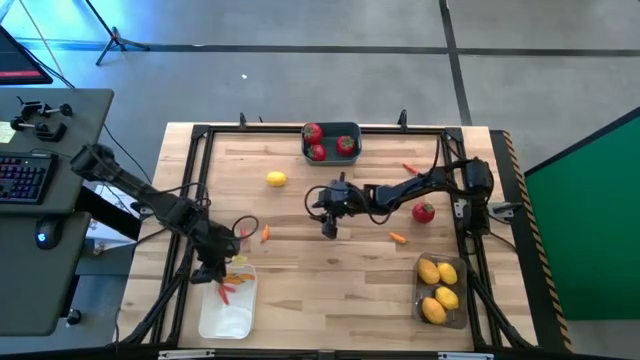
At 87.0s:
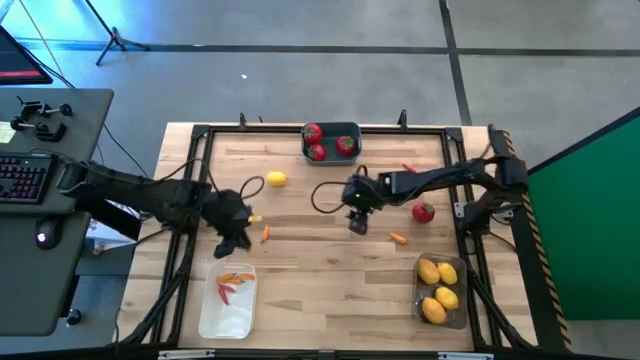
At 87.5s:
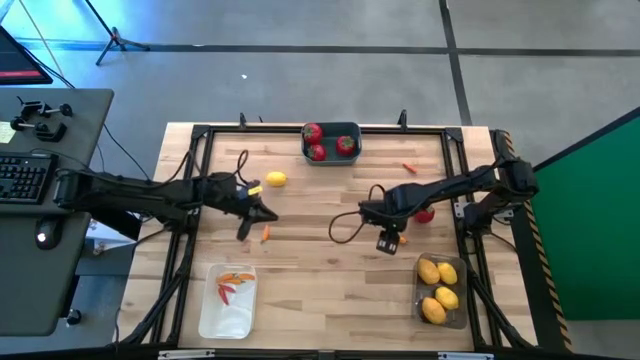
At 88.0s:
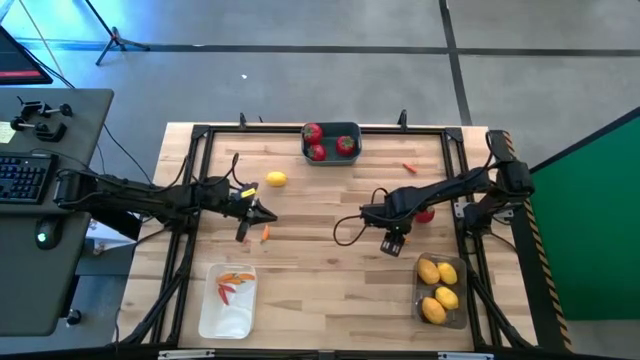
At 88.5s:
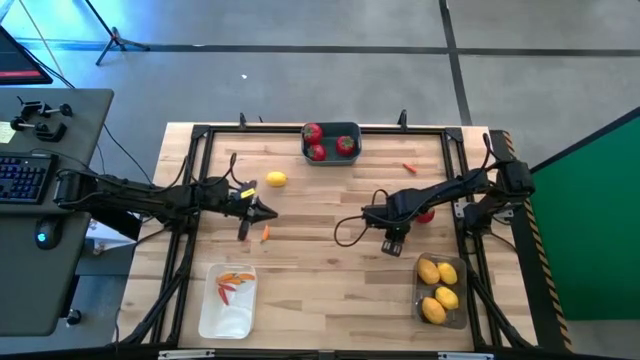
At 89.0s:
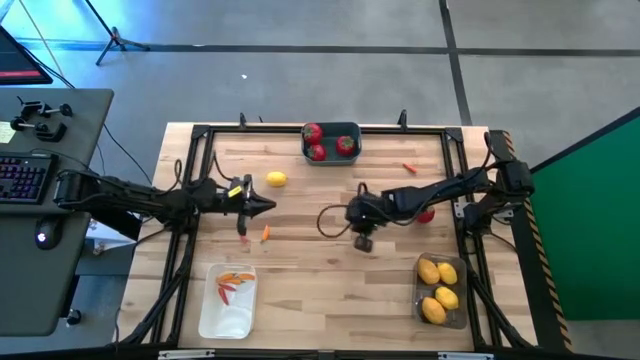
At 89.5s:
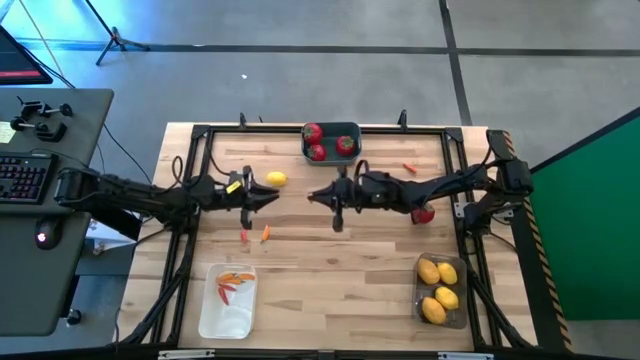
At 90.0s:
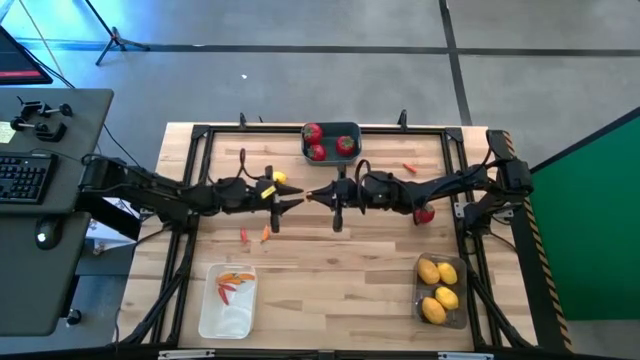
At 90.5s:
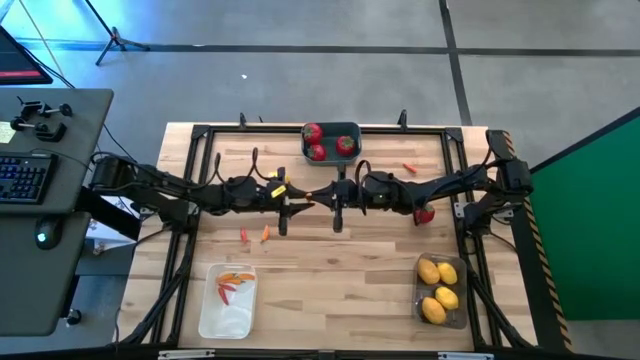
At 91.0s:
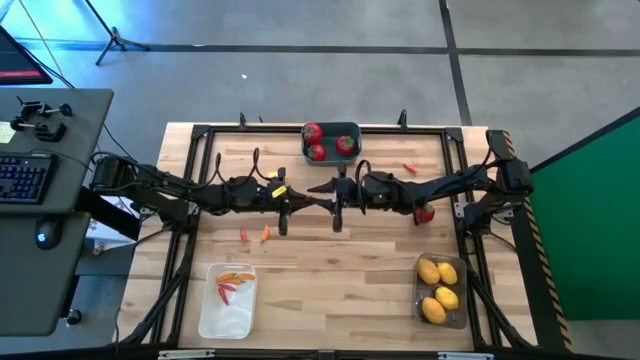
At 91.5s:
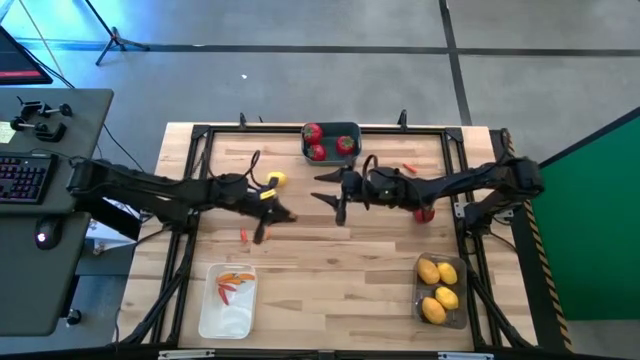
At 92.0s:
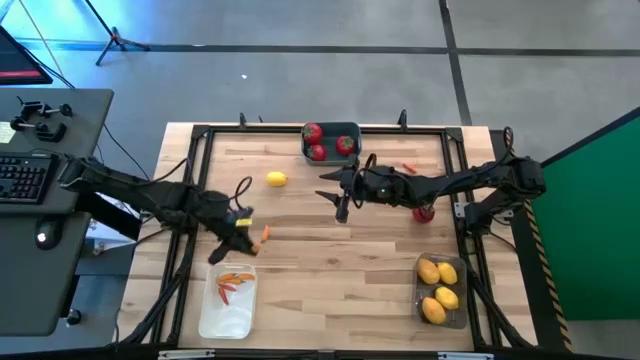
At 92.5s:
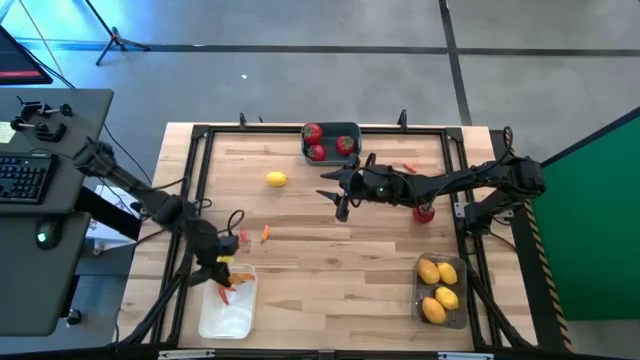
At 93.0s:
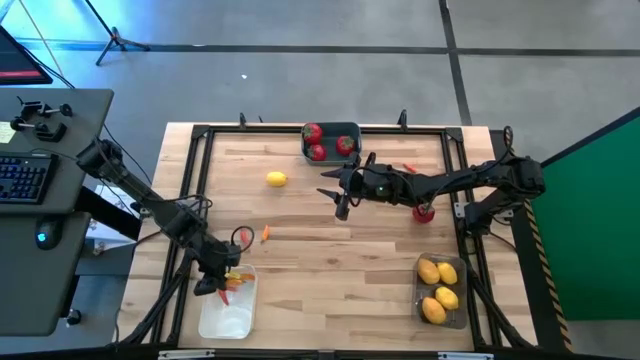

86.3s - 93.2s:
Task: Sort produce into baskets
Put the right orange chili pepper into the white bin

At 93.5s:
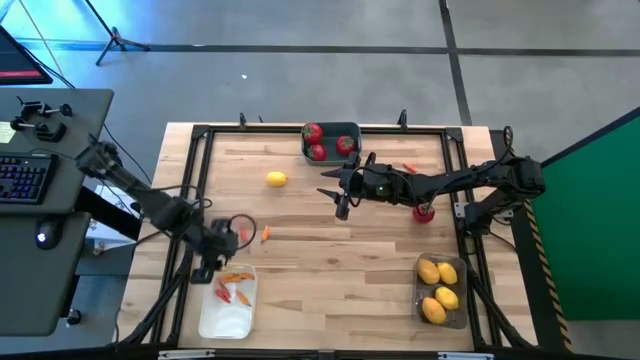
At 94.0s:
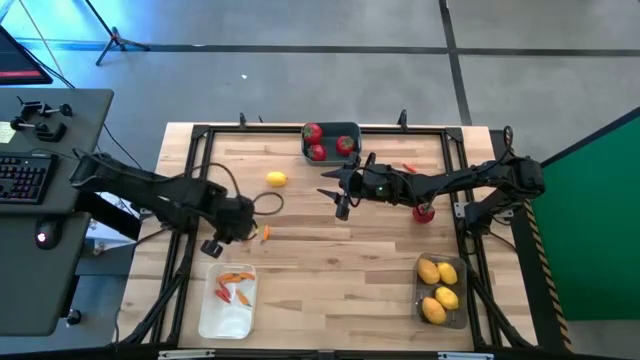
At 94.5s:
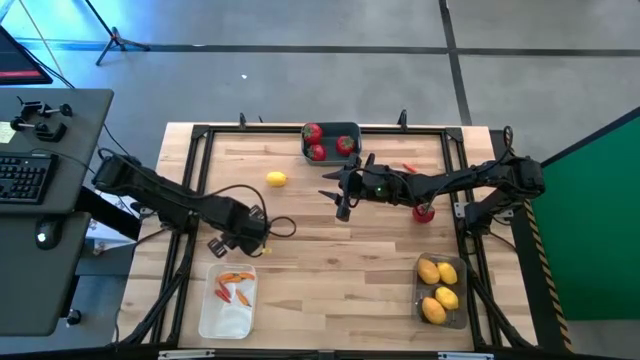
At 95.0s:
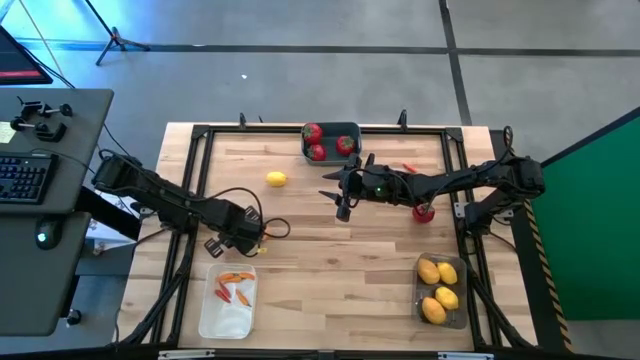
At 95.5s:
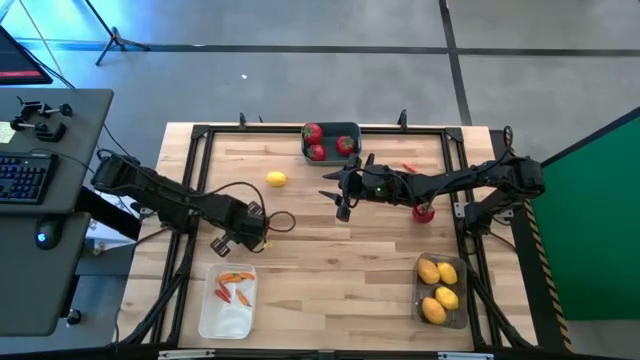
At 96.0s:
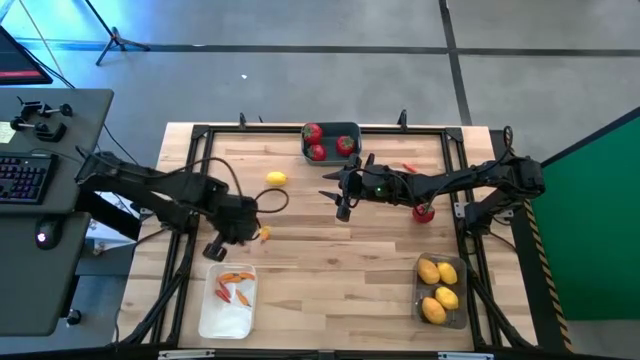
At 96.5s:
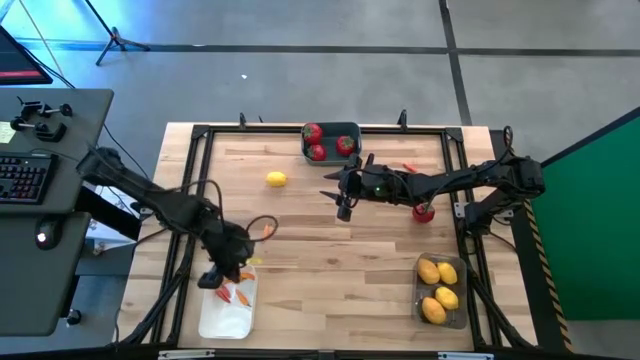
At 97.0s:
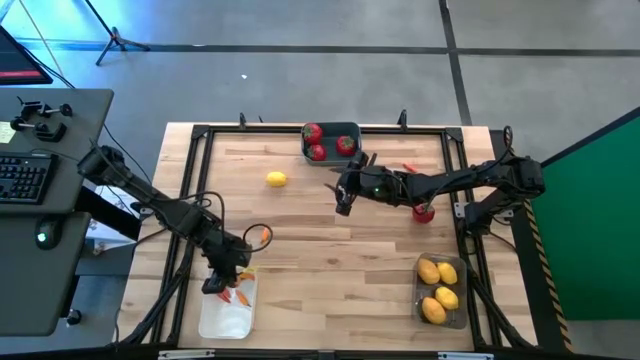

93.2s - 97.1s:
Put the left red chili pepper into the white bin

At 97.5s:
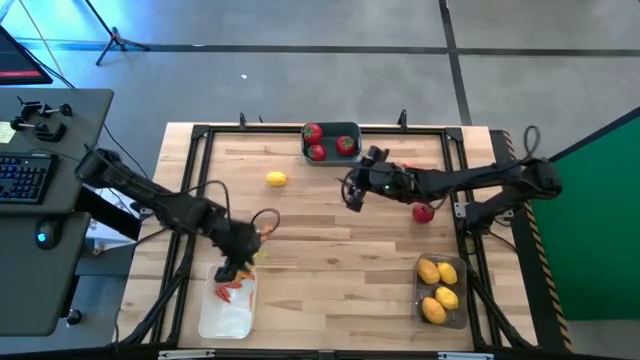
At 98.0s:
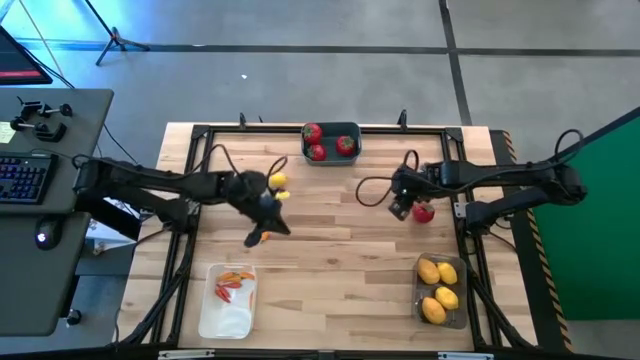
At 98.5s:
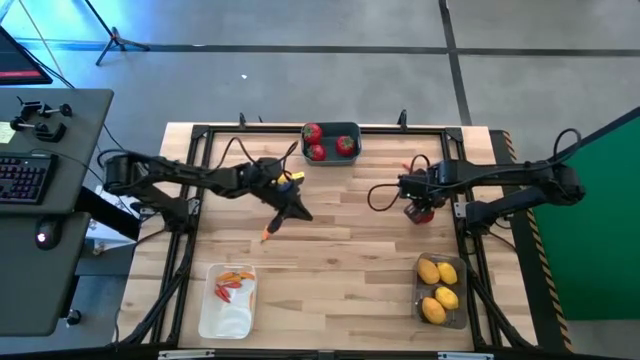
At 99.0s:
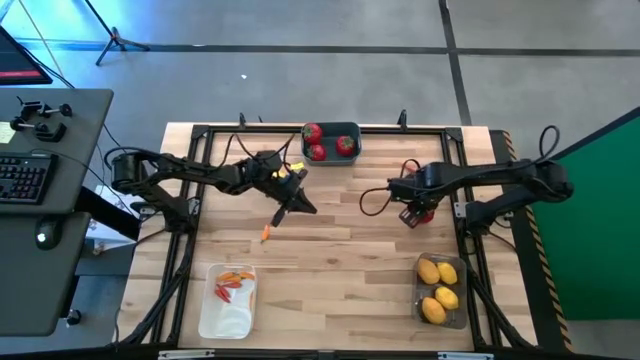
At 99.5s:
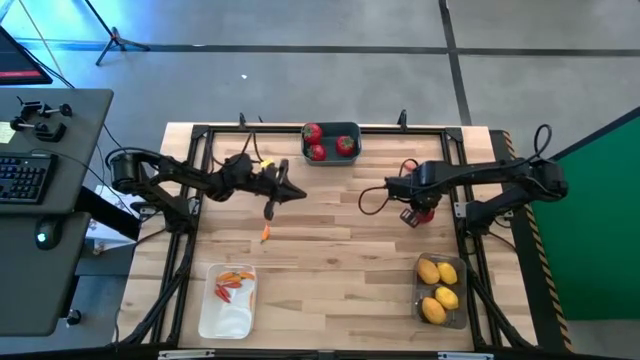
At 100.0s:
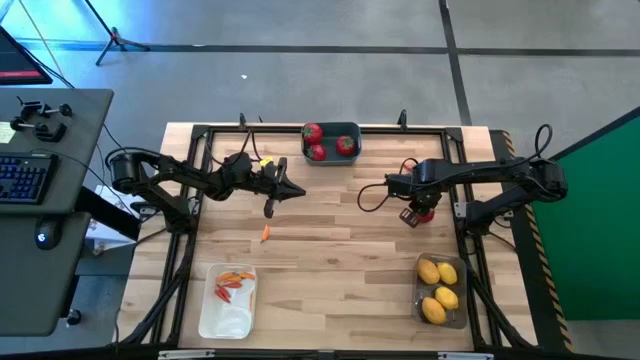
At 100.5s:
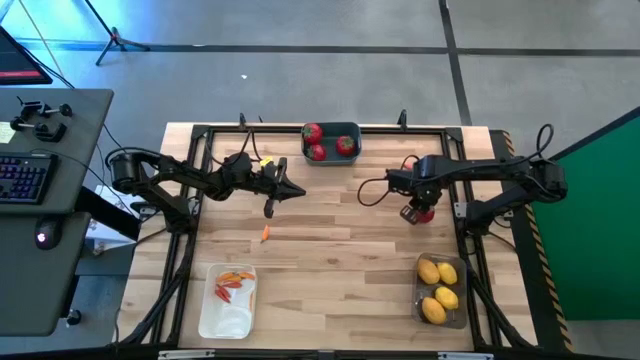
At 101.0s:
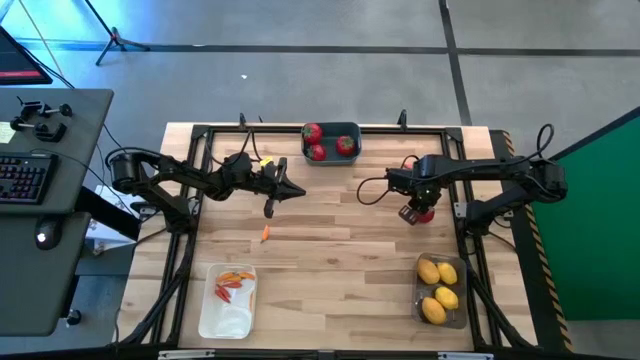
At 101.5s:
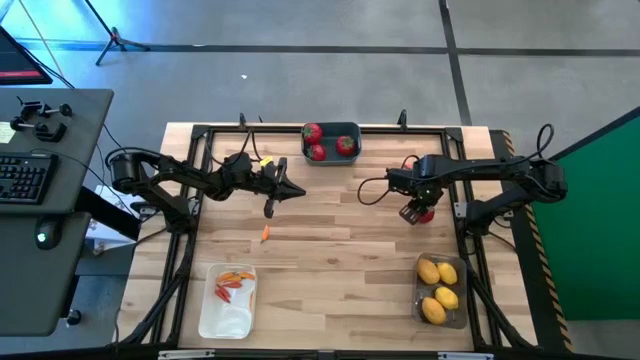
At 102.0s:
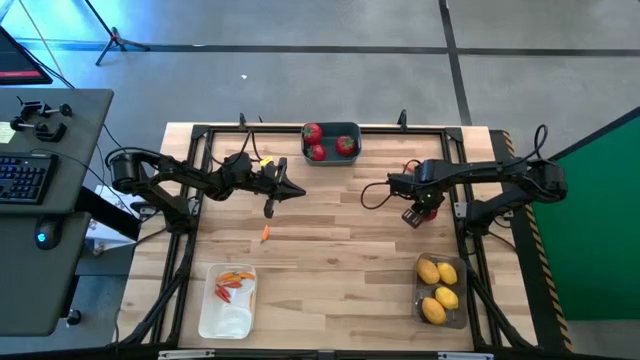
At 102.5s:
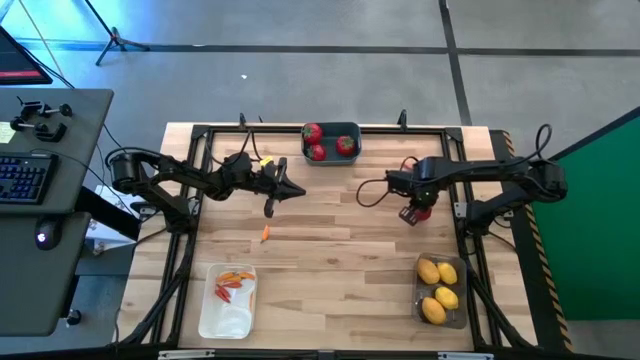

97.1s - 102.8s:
Put the red tomato into the blue bin

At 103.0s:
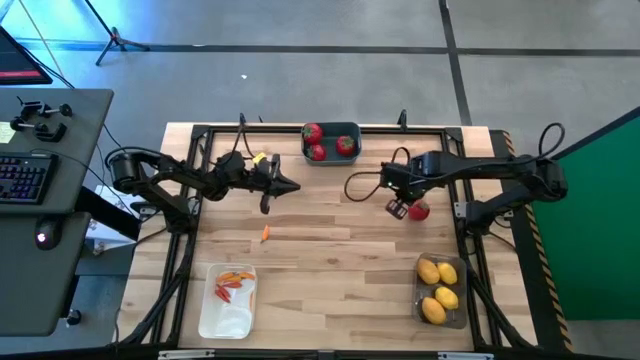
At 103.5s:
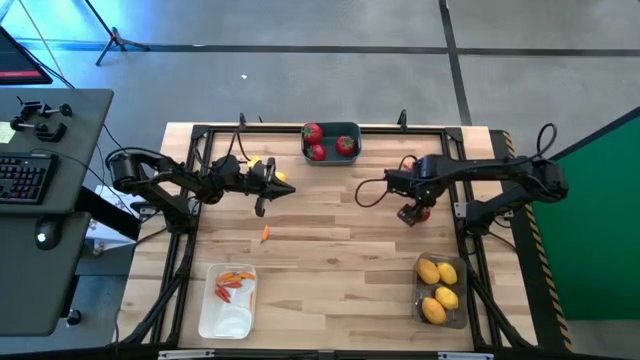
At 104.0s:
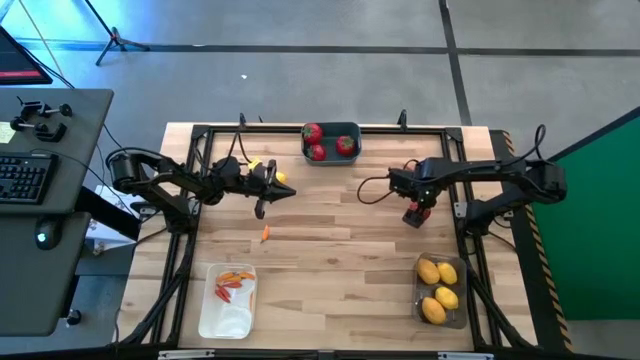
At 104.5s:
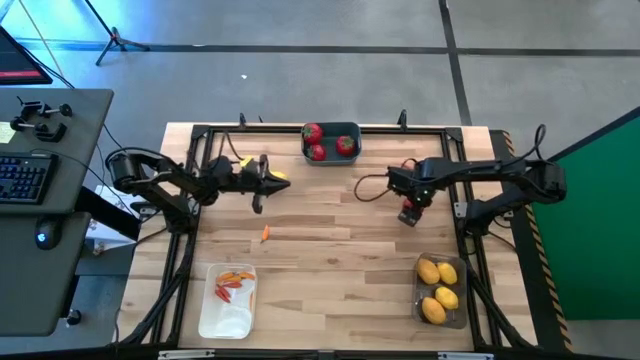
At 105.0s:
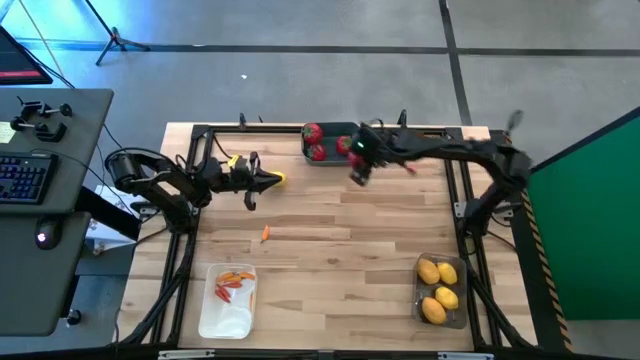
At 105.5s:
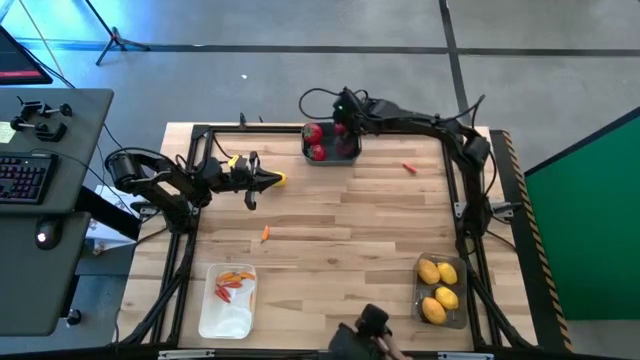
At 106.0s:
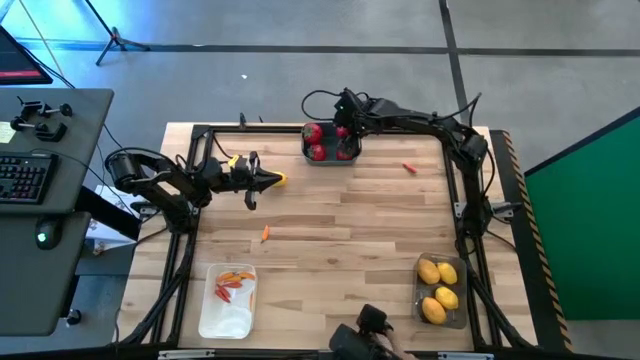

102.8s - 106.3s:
Put the red tomato into the blue bin

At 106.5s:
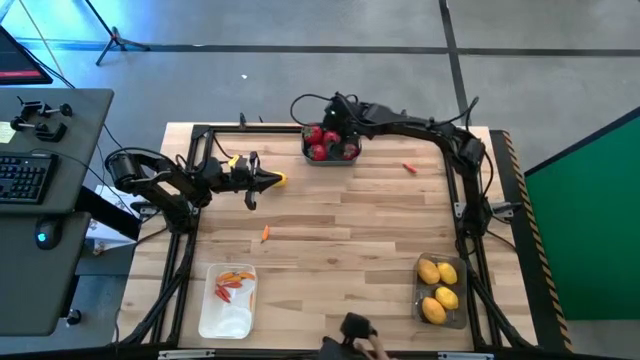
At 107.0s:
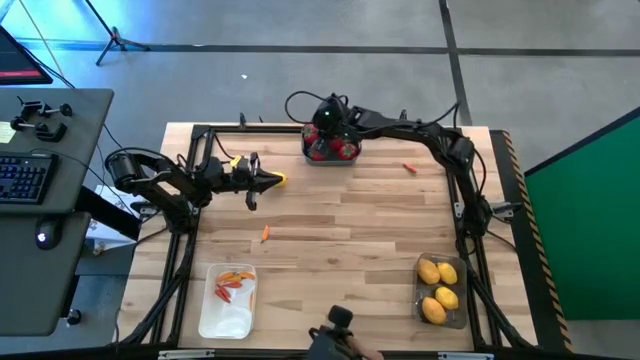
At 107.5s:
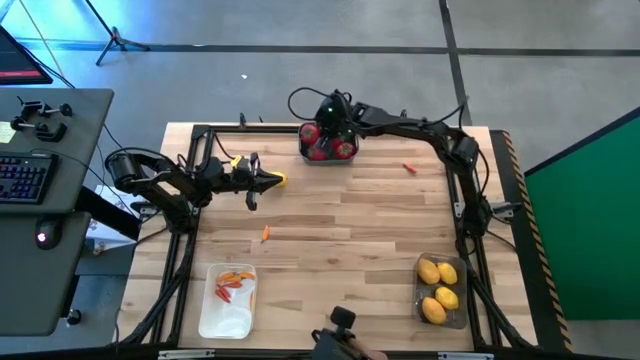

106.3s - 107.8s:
Adjust the red tomatoes in the blue bin
